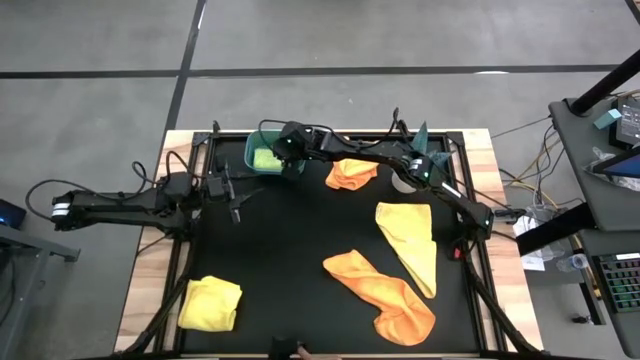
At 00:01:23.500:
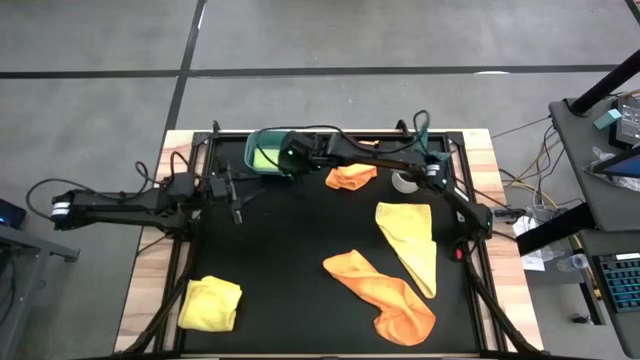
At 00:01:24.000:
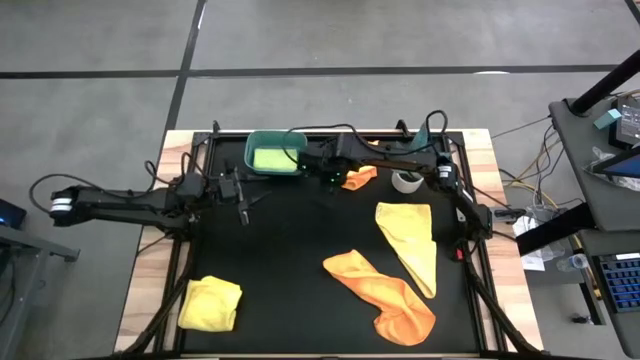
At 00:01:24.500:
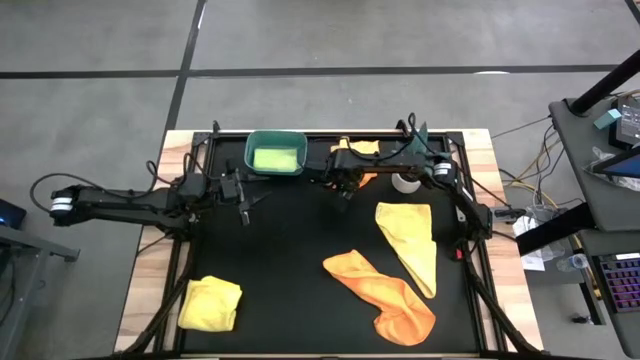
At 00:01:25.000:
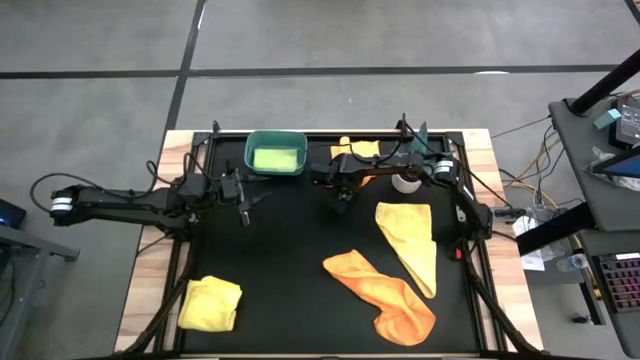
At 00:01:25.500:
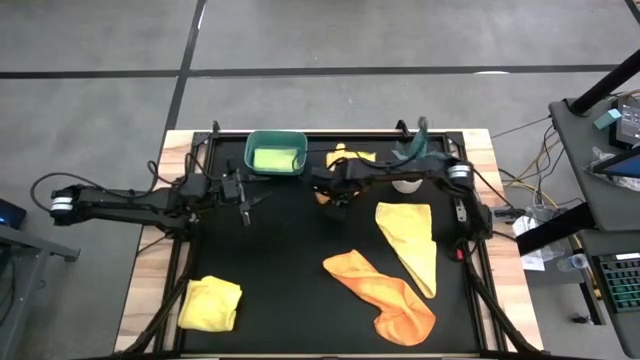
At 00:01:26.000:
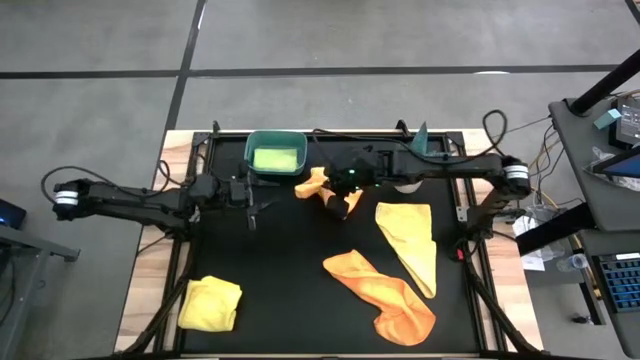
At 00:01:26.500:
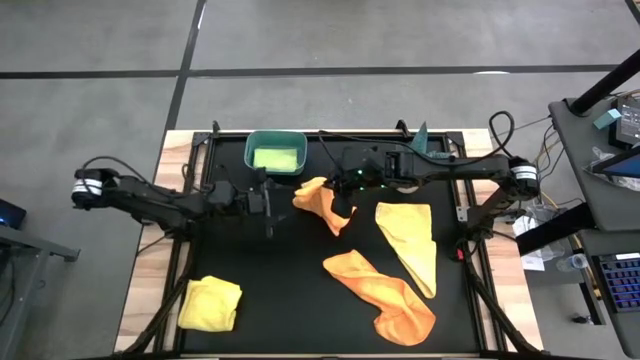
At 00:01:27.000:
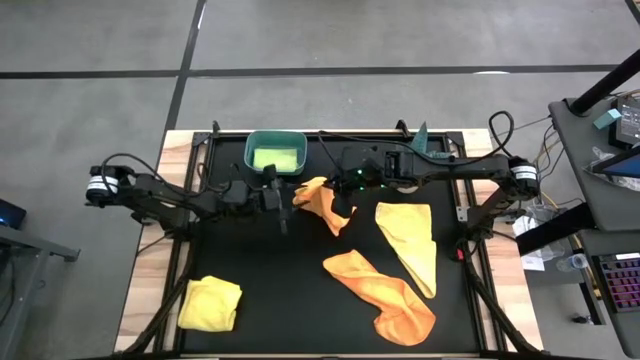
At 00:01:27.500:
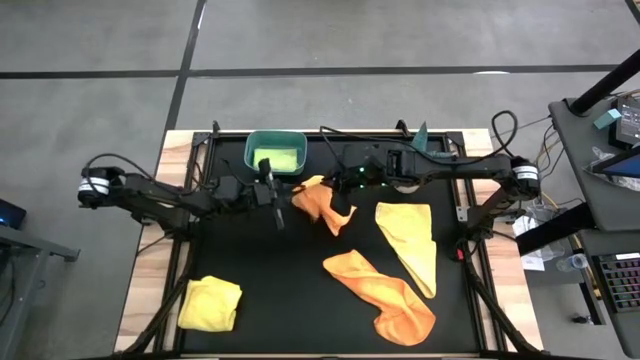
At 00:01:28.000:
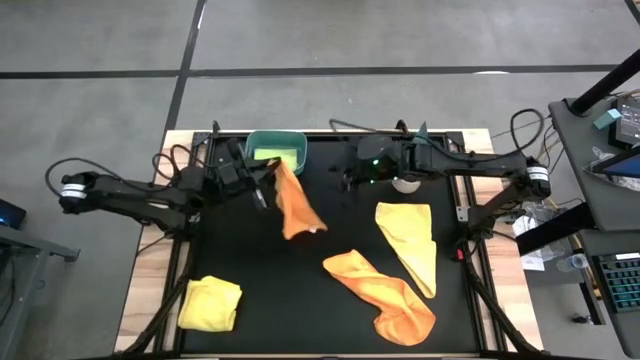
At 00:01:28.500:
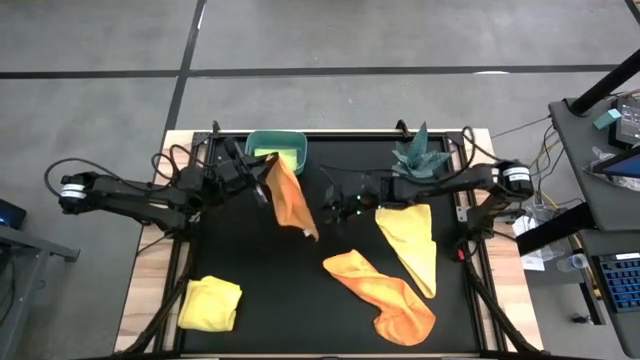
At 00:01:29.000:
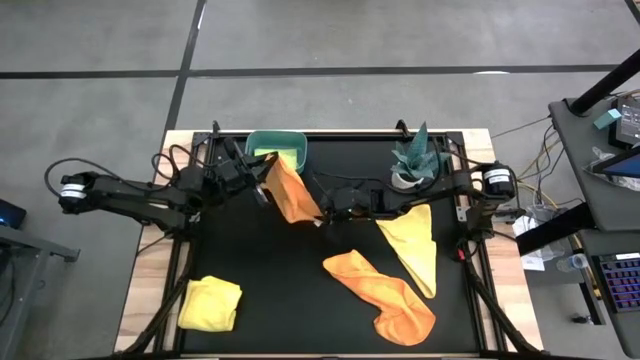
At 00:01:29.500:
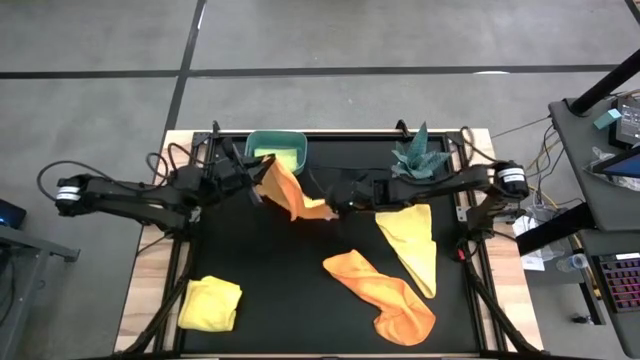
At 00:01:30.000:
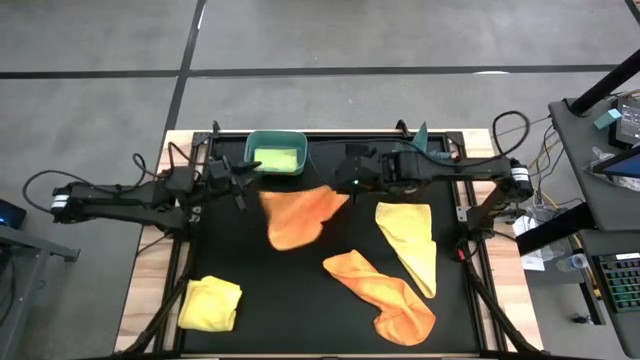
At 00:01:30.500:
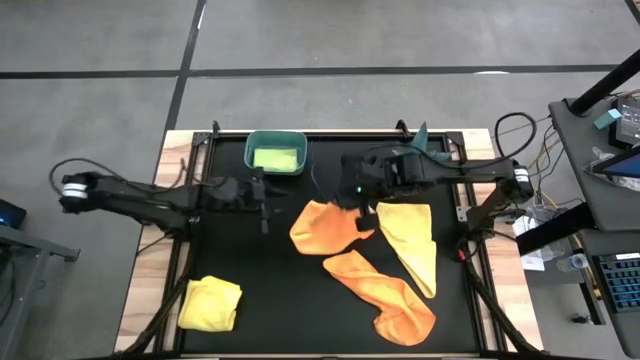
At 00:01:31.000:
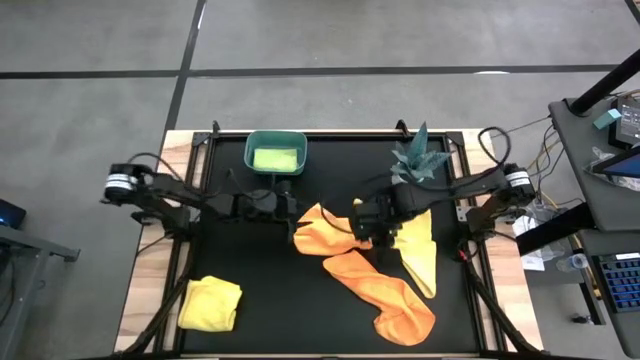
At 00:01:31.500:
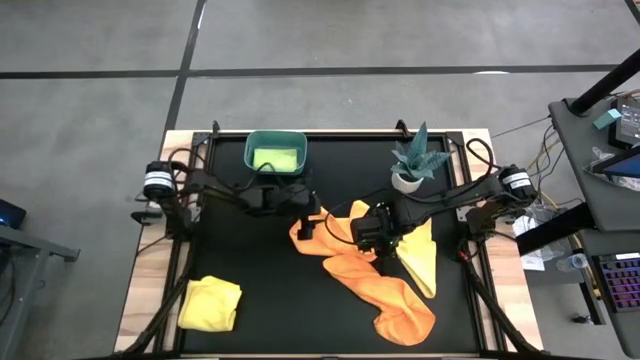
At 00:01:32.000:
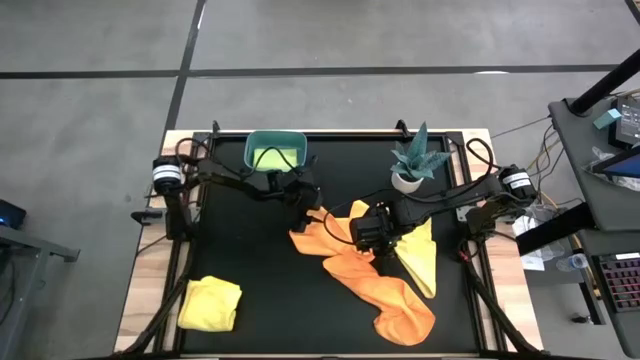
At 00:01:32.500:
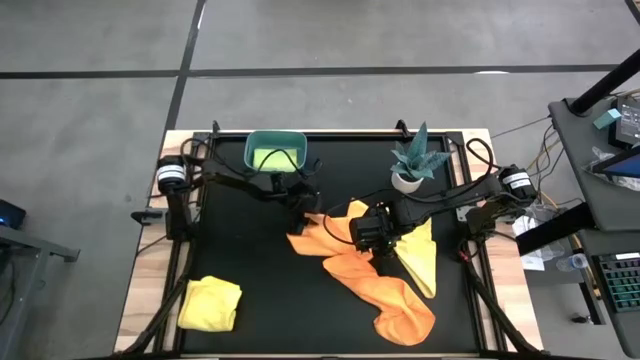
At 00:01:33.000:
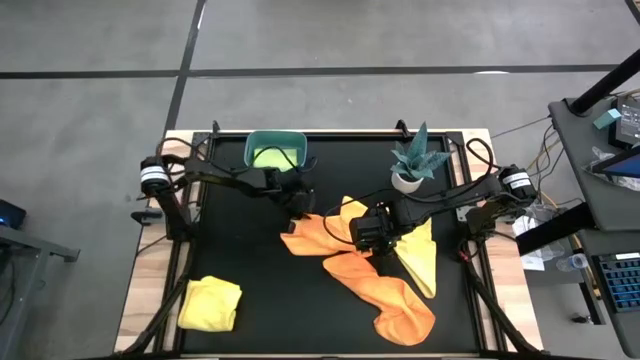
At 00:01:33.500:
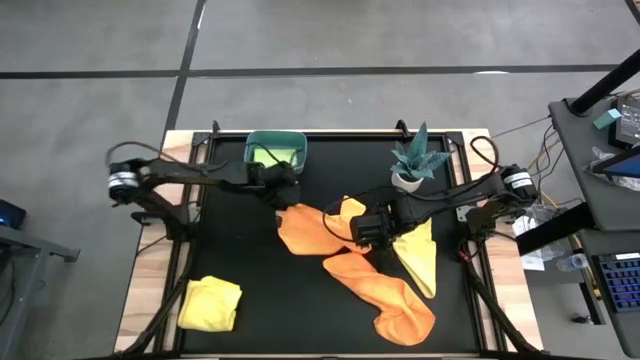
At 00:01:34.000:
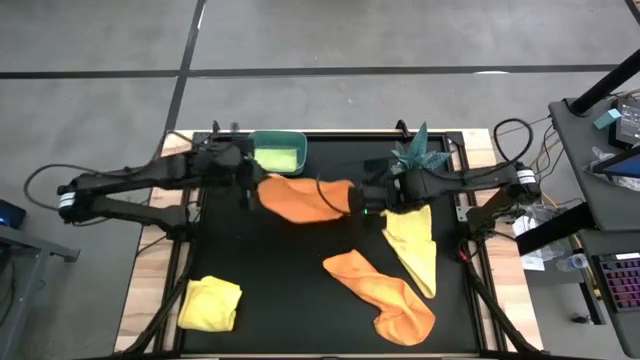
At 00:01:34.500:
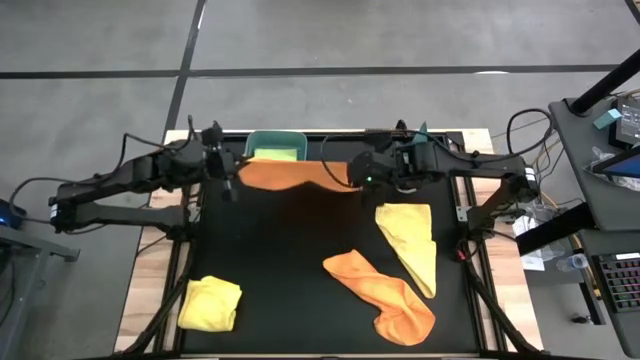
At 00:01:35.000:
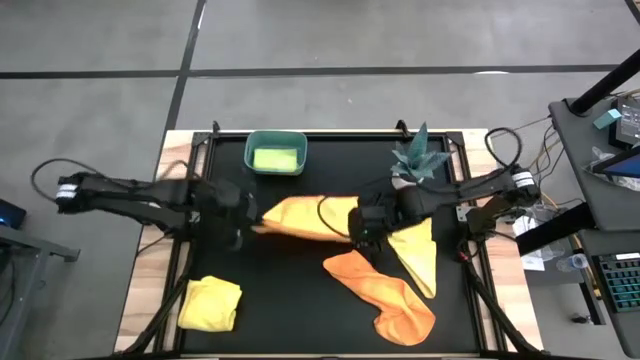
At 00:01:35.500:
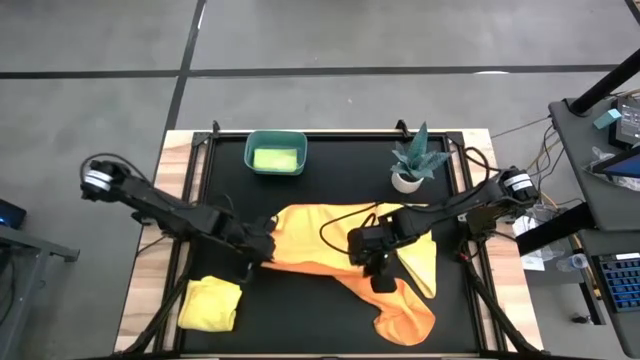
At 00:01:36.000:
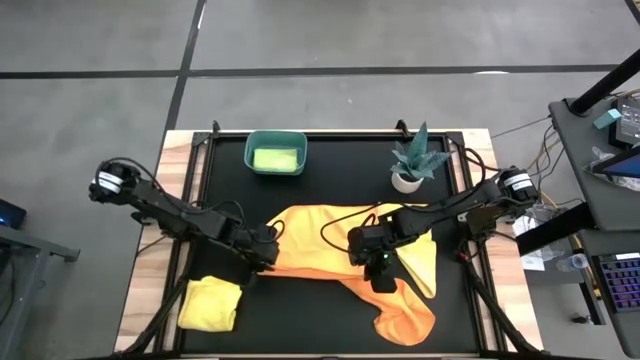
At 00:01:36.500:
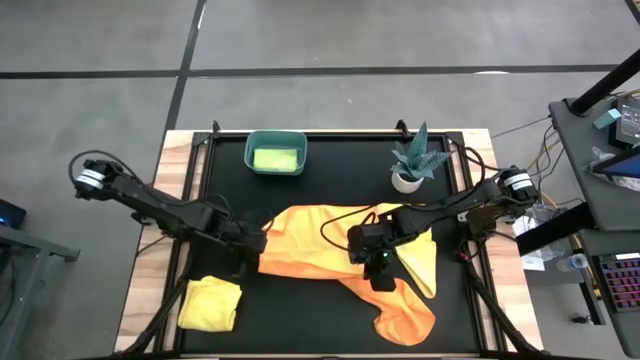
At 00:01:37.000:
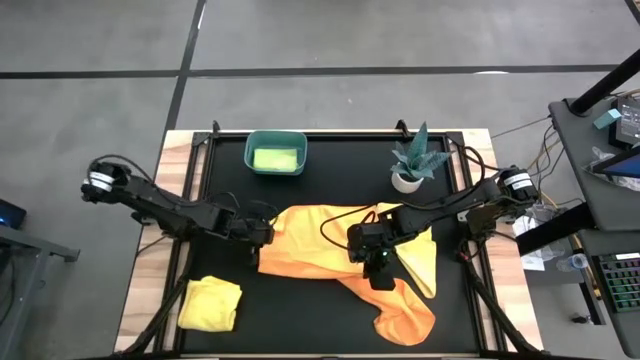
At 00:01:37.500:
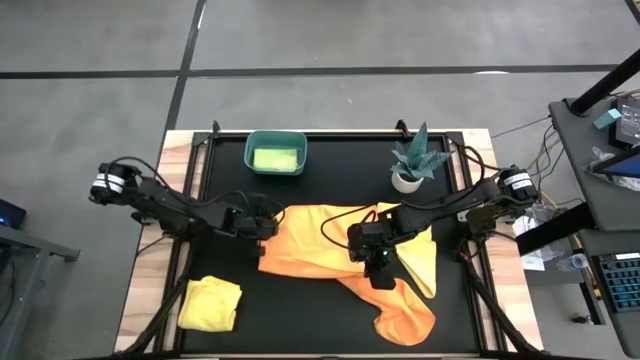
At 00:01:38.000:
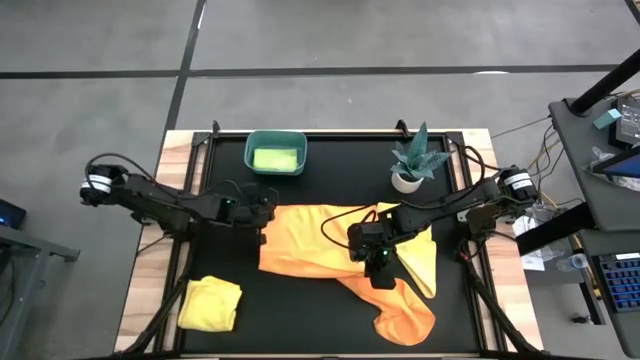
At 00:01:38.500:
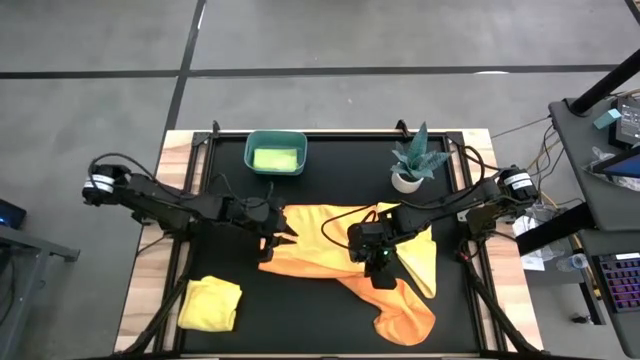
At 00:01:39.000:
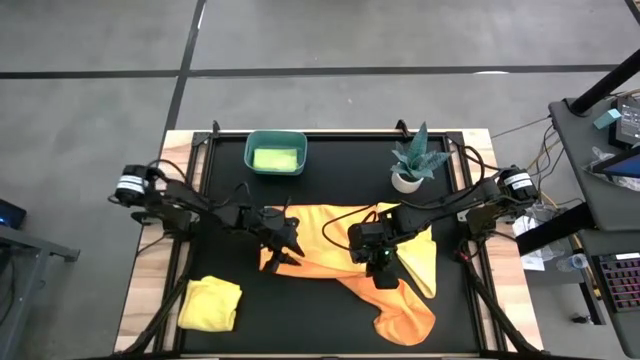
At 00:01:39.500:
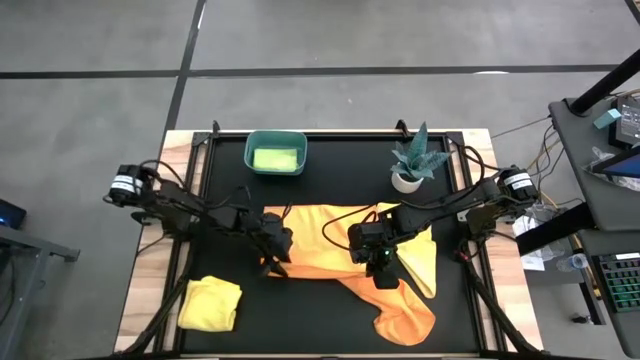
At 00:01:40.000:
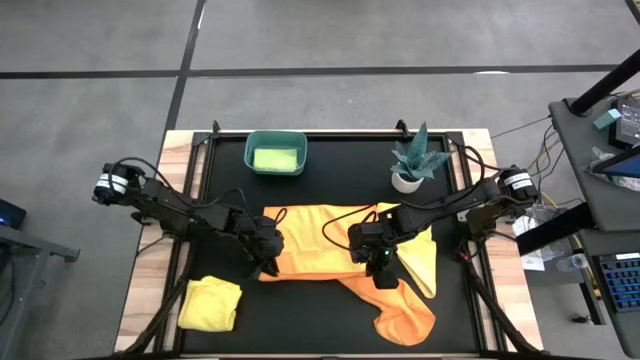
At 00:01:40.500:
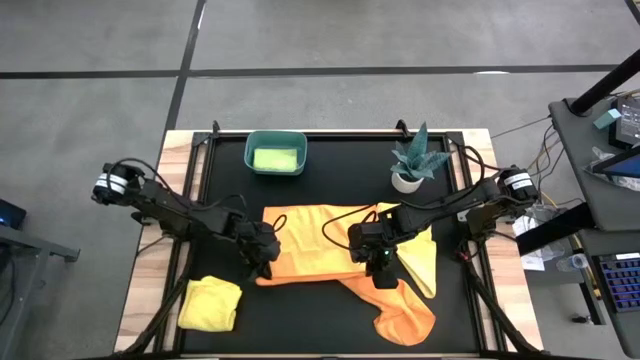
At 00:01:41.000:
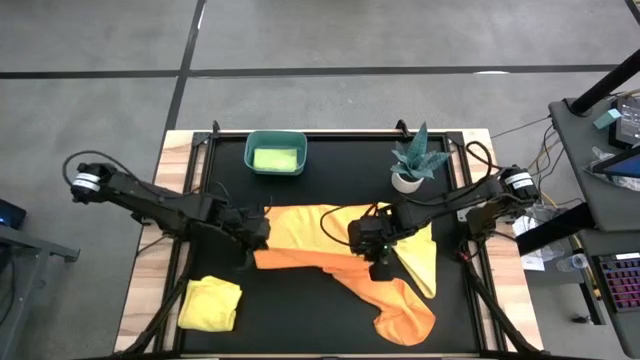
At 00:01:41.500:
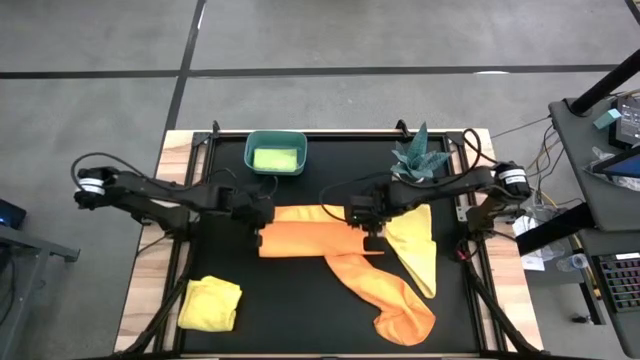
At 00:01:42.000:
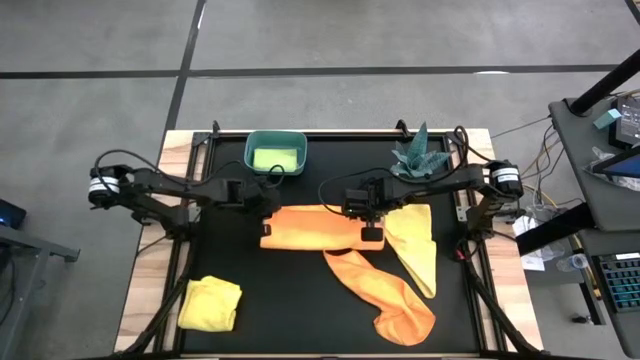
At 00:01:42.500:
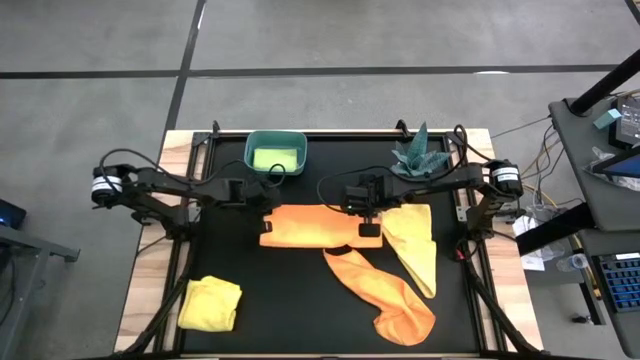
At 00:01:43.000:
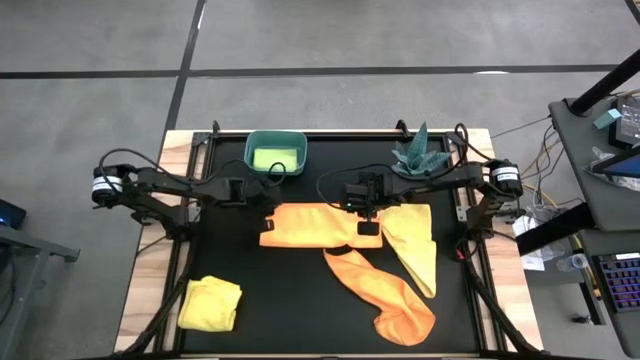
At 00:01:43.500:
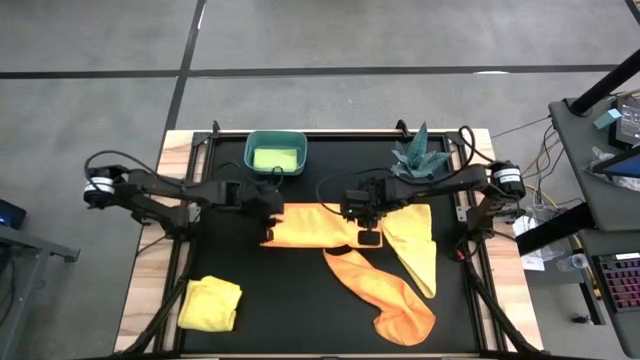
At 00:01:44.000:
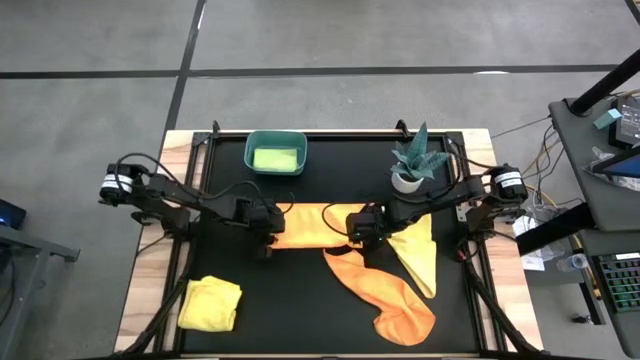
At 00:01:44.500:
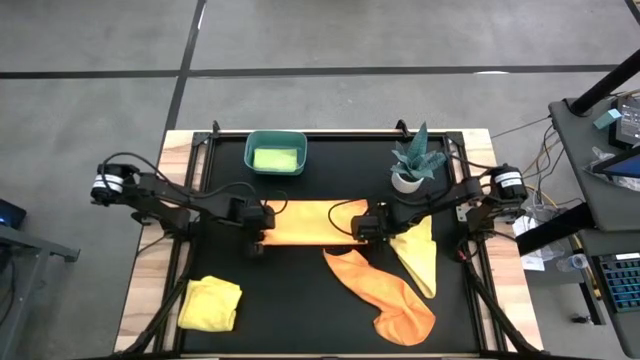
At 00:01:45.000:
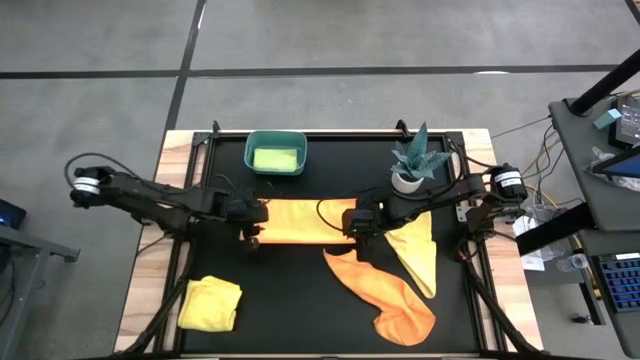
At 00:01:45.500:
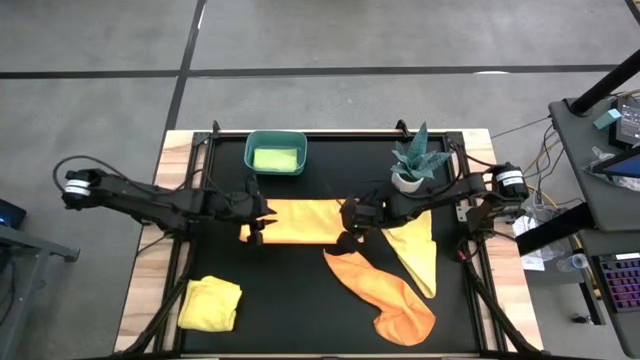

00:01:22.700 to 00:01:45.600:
Task: Fold microfiber towels
Fold the top orange microfiber cloth
